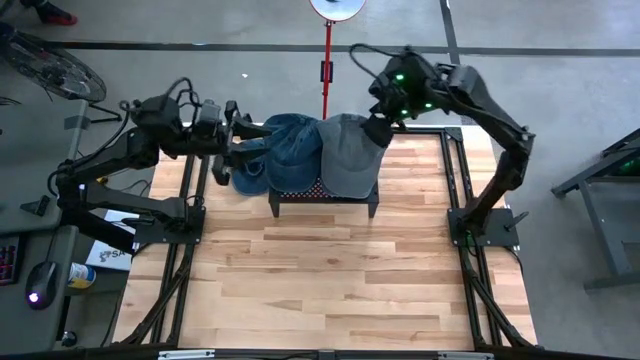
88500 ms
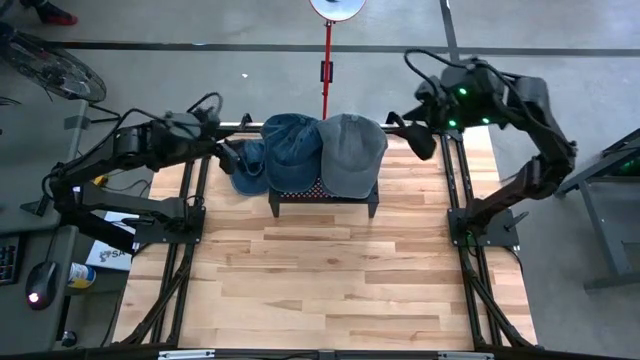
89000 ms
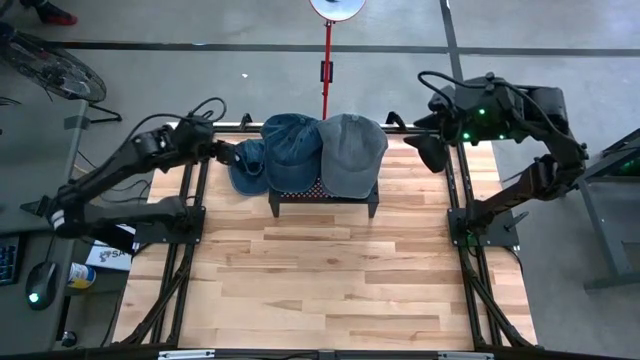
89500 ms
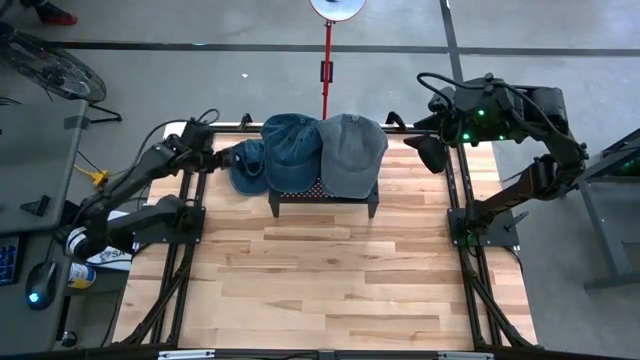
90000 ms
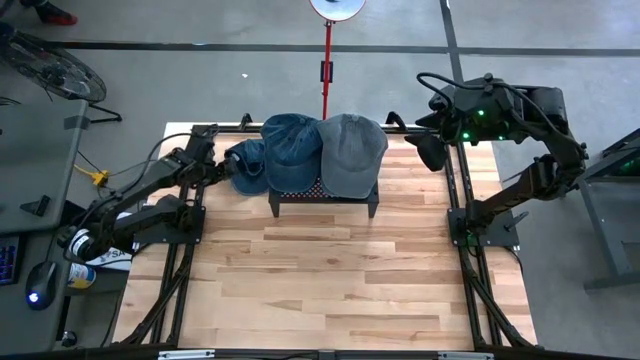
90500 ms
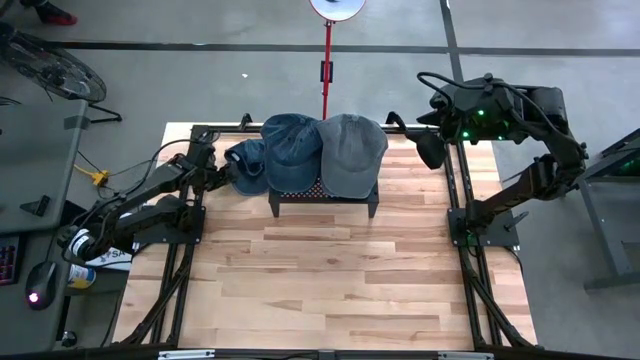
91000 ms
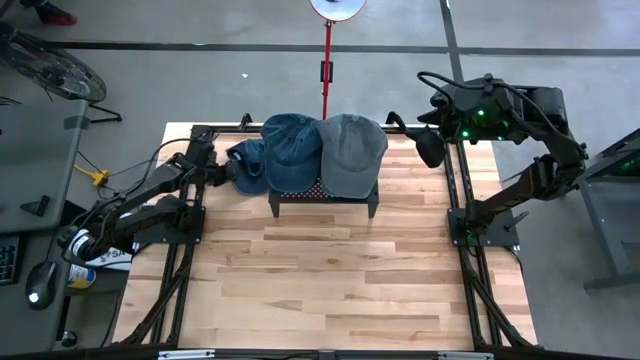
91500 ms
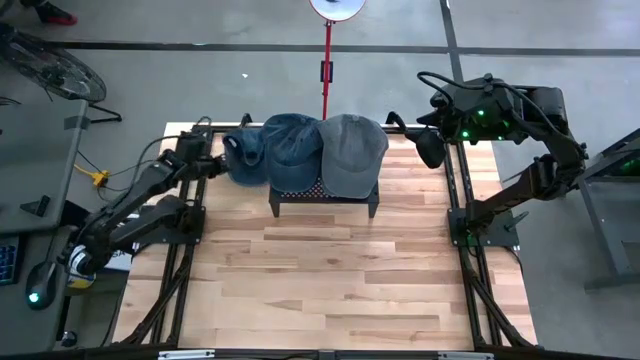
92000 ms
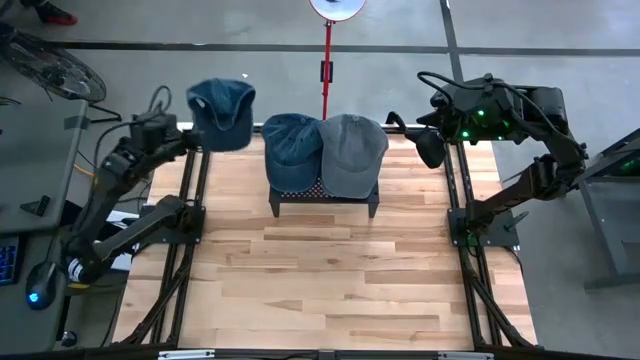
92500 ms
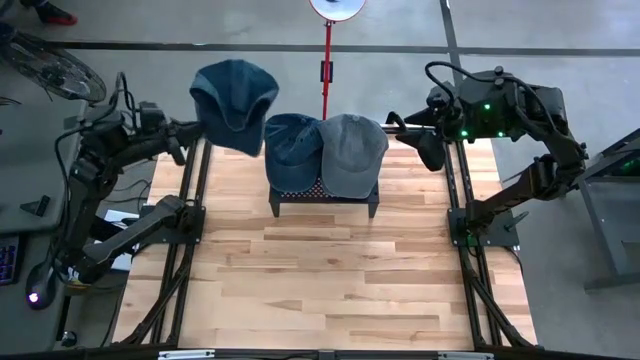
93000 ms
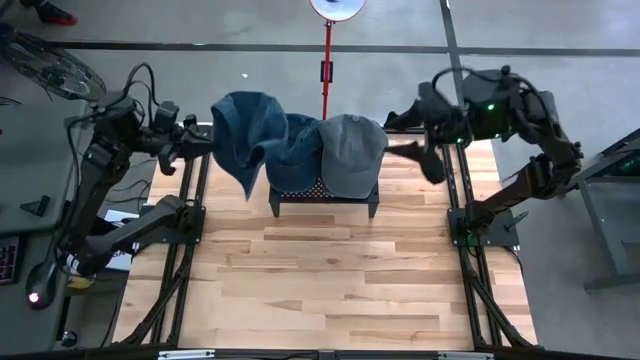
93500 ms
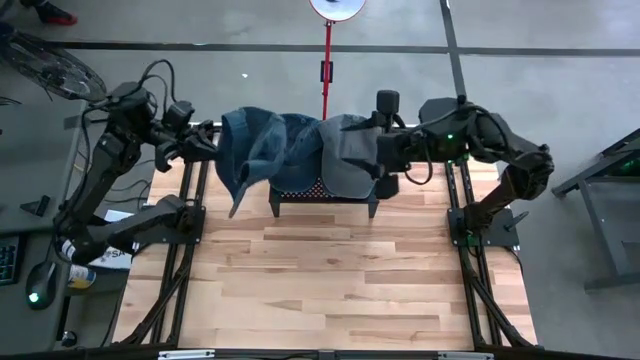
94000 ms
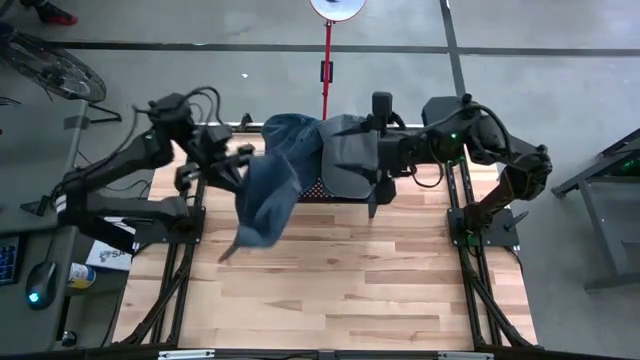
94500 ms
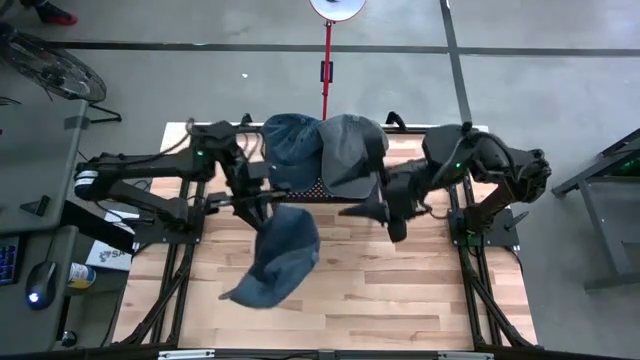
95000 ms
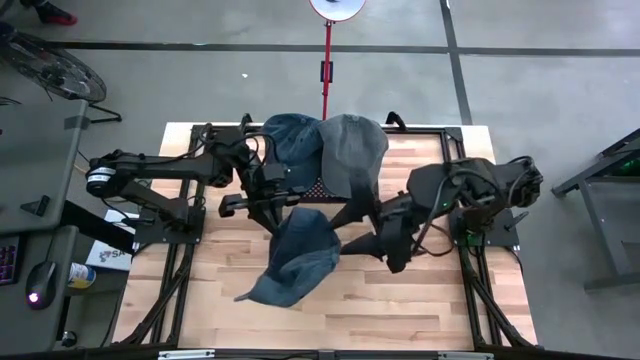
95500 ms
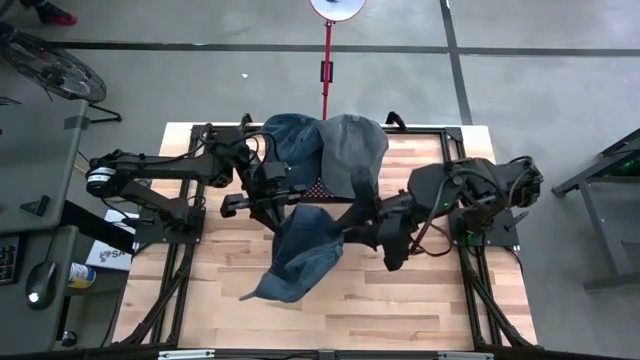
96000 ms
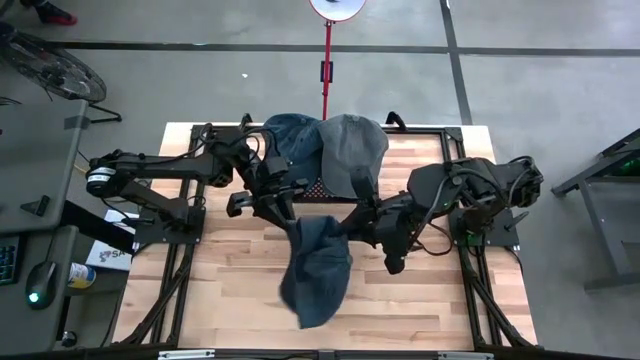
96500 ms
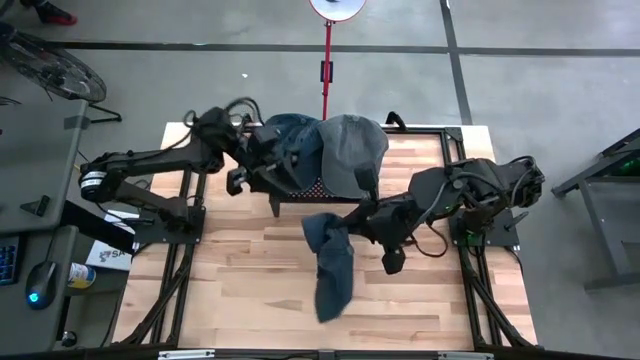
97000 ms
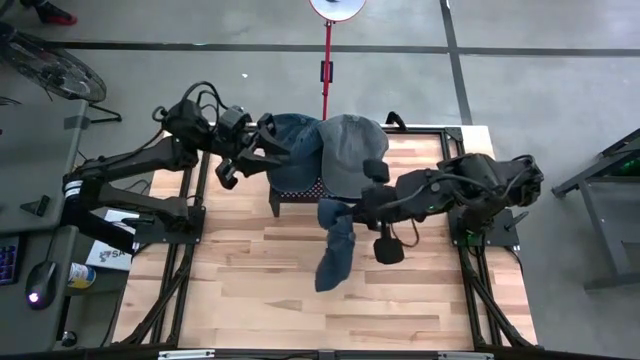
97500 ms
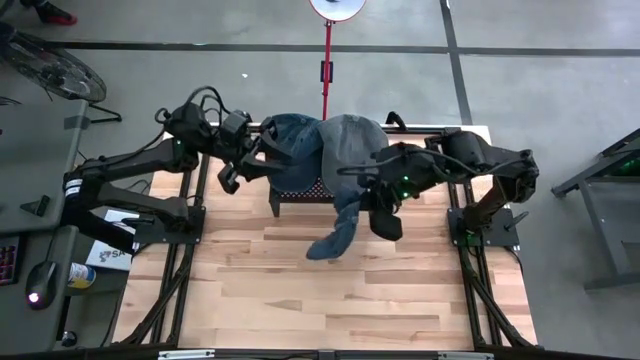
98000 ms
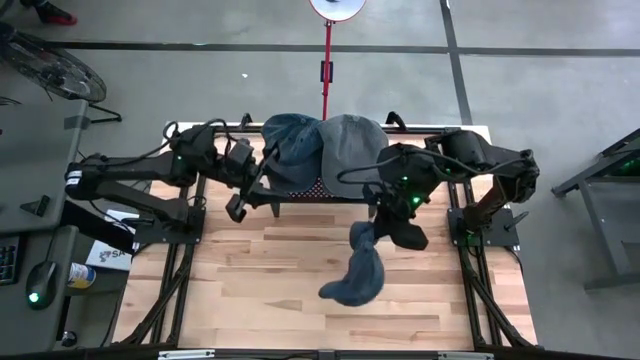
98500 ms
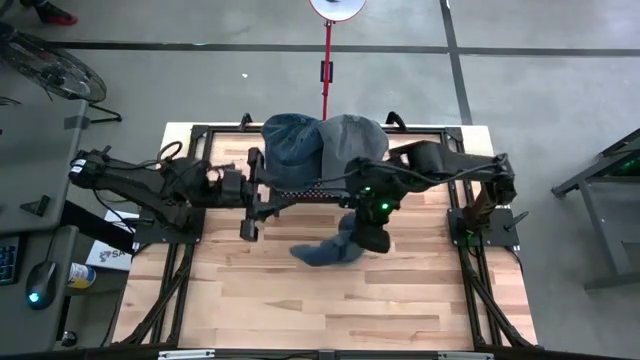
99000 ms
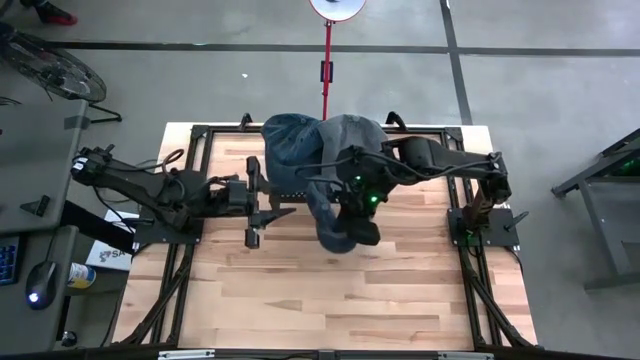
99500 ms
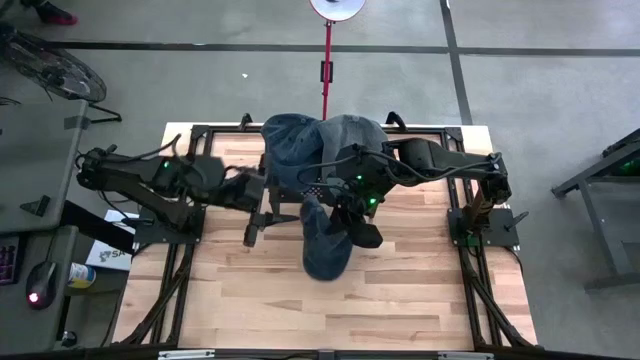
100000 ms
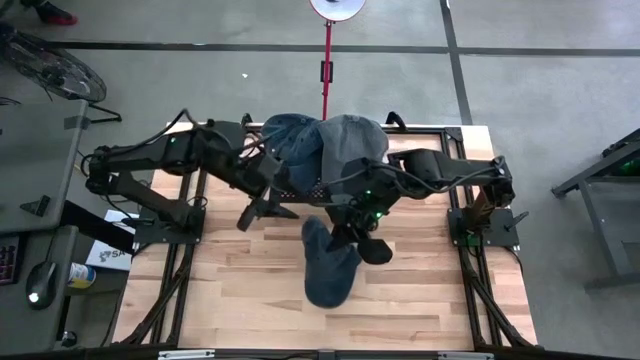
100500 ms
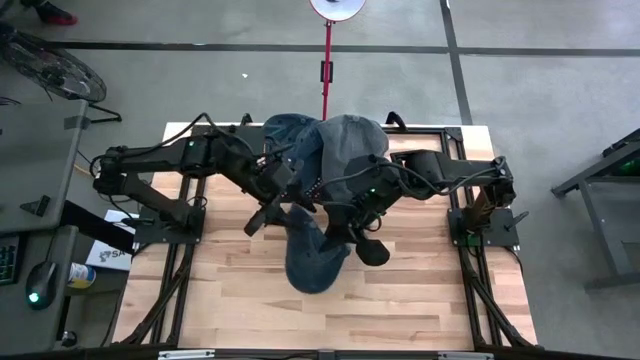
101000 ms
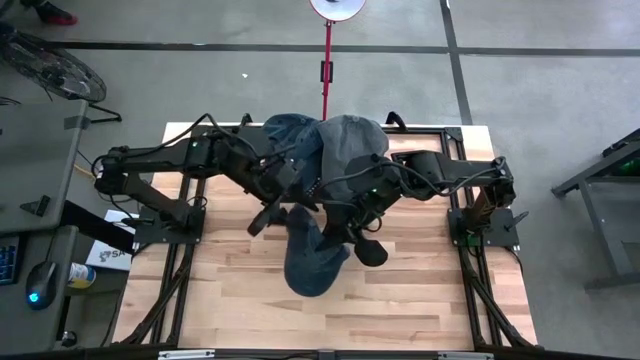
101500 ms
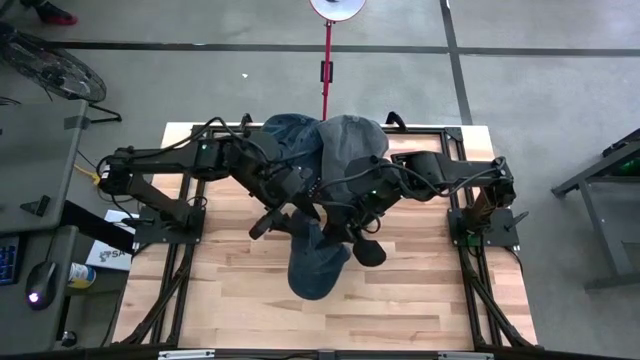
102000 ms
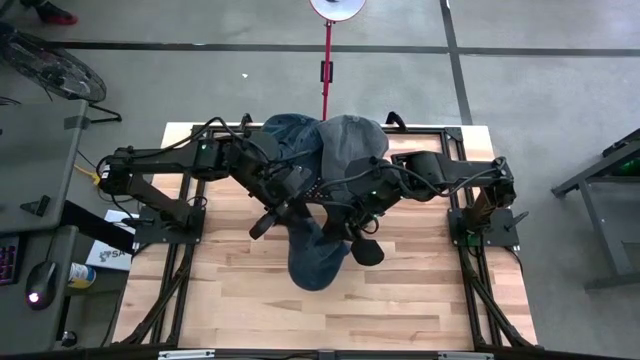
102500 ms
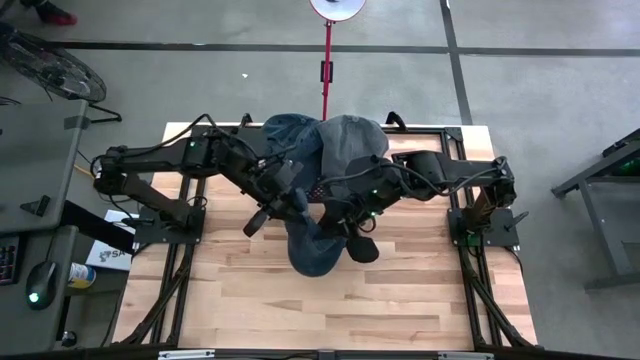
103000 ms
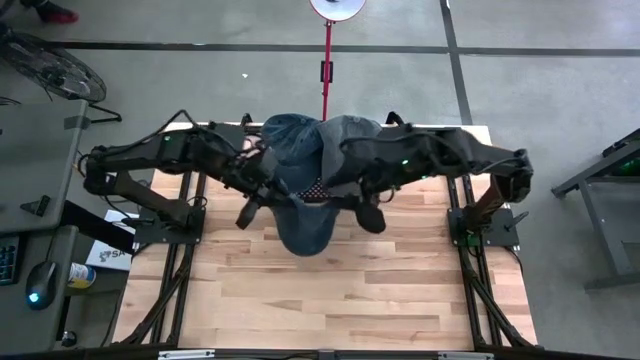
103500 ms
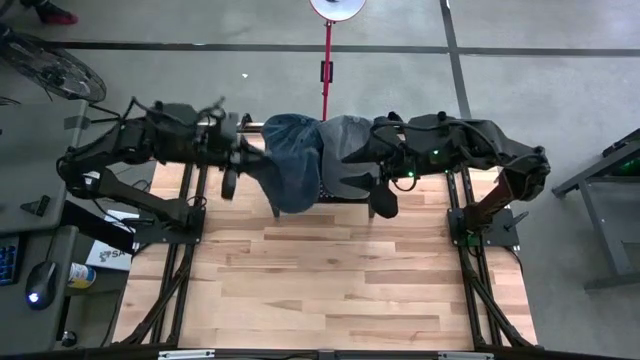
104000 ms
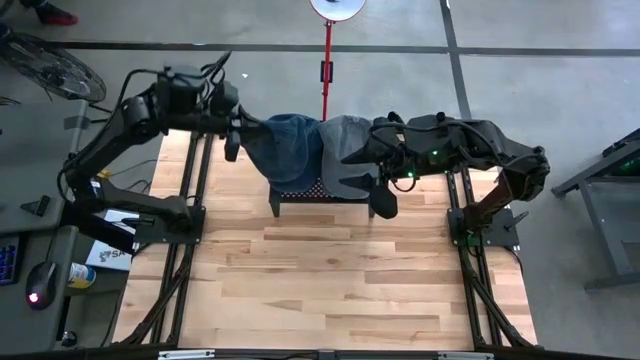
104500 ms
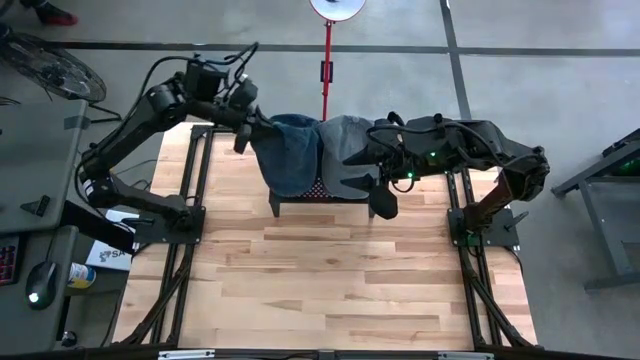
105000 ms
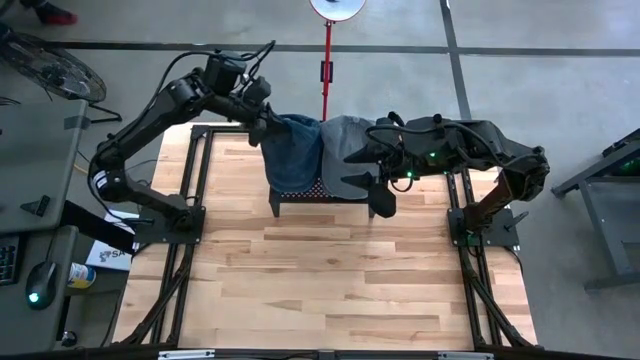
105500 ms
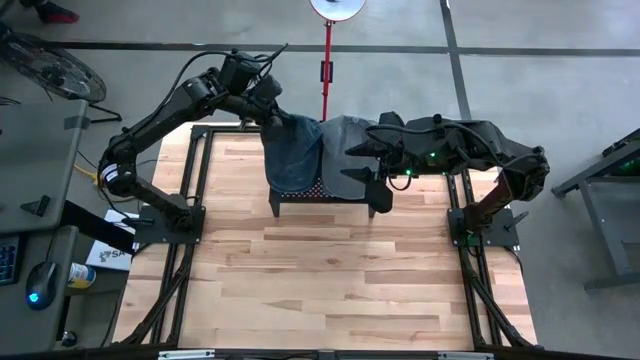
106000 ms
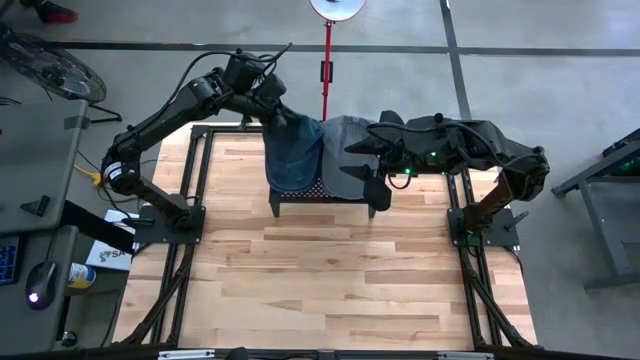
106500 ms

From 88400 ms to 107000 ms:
Task: Pick & Place hat
Stack the black cap on the black cap
